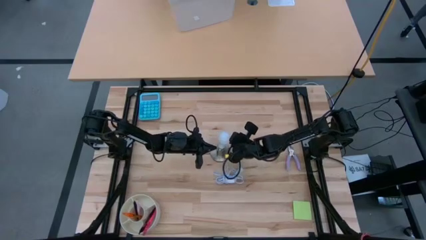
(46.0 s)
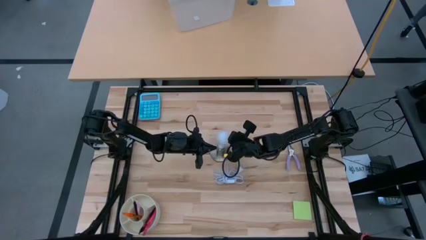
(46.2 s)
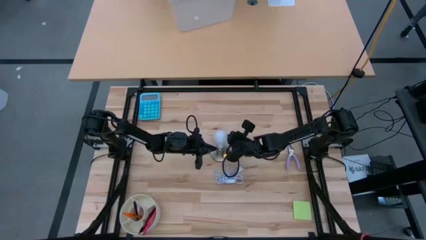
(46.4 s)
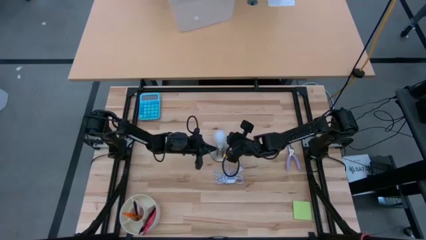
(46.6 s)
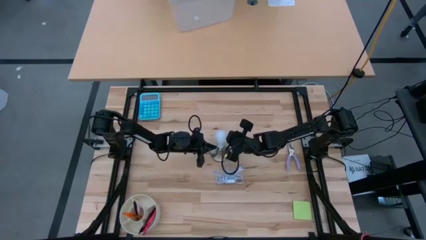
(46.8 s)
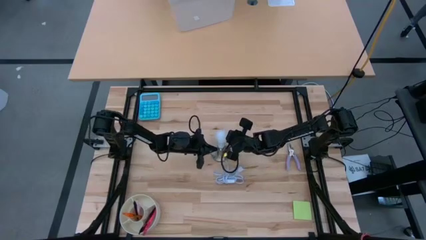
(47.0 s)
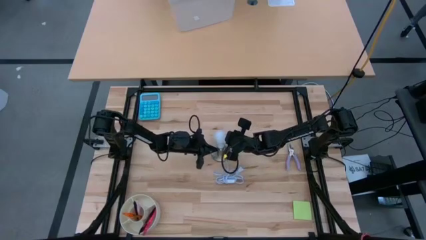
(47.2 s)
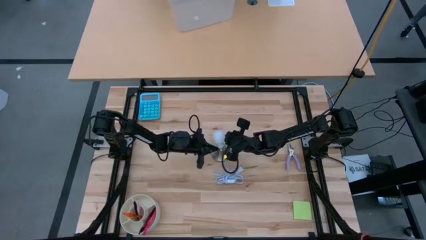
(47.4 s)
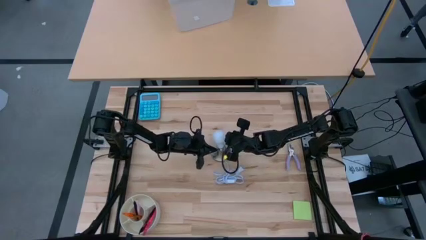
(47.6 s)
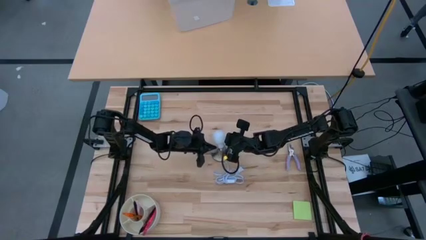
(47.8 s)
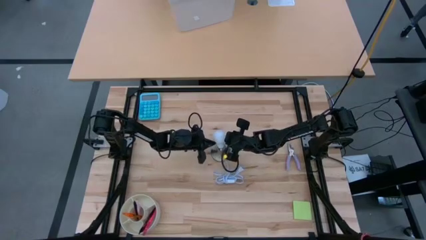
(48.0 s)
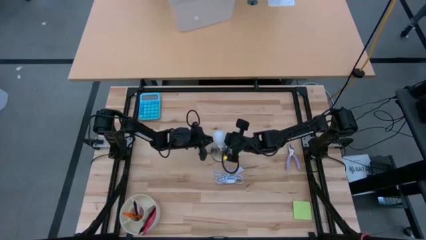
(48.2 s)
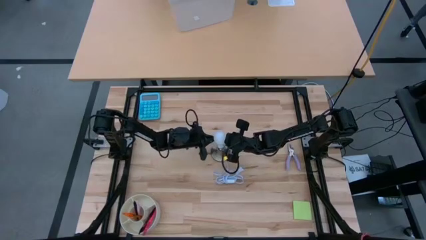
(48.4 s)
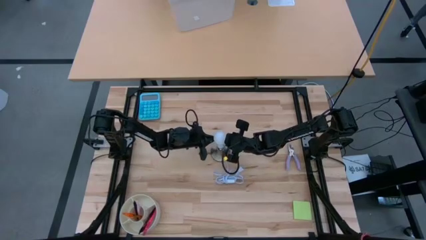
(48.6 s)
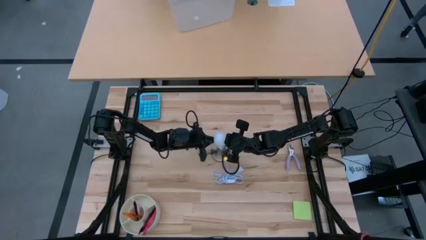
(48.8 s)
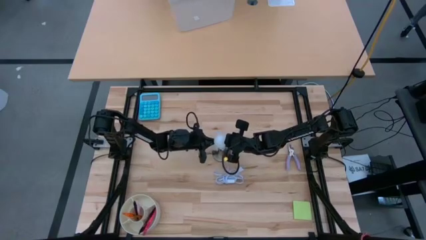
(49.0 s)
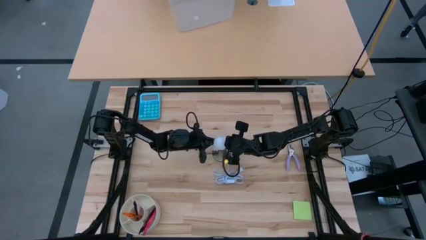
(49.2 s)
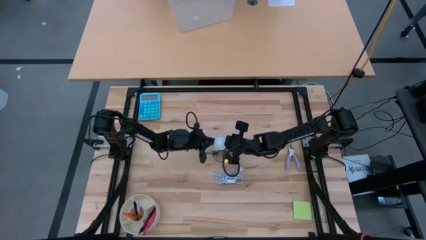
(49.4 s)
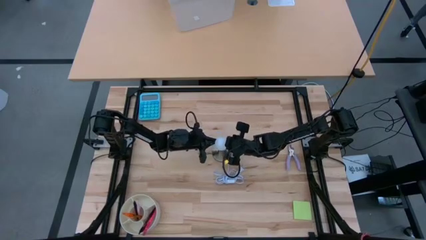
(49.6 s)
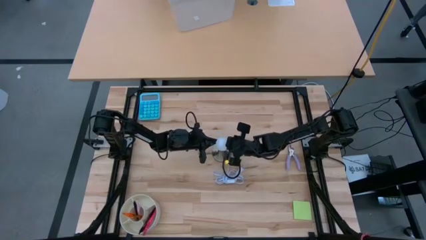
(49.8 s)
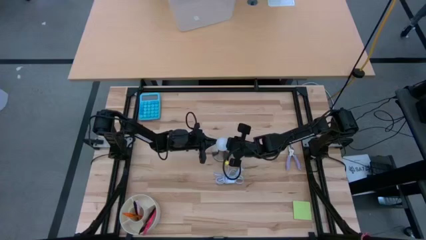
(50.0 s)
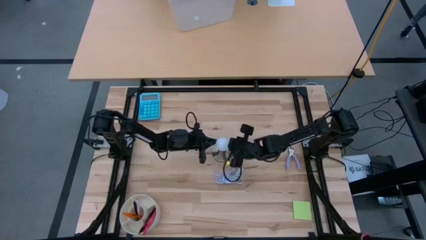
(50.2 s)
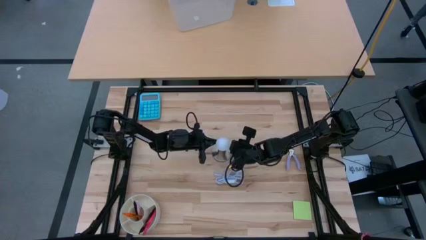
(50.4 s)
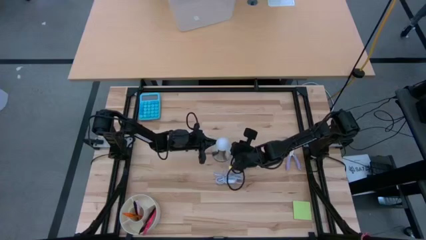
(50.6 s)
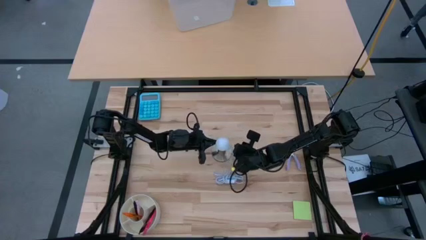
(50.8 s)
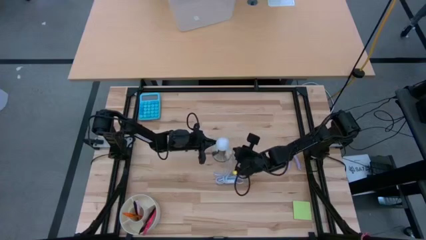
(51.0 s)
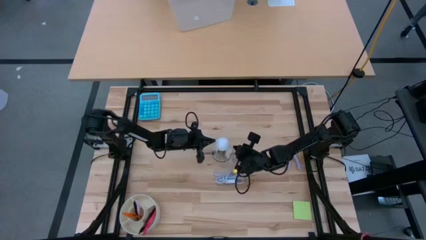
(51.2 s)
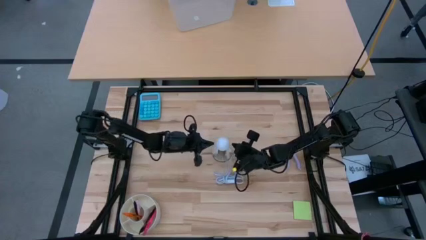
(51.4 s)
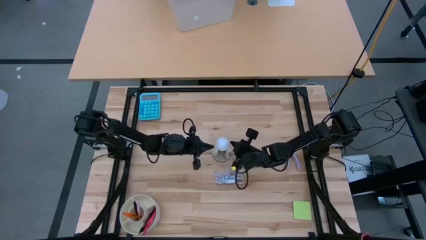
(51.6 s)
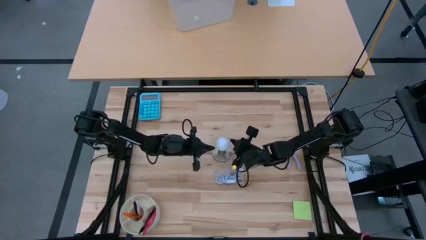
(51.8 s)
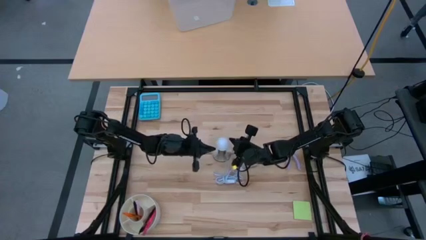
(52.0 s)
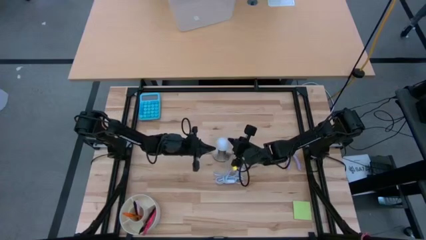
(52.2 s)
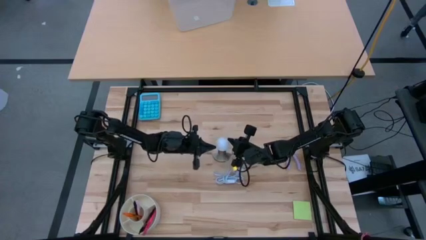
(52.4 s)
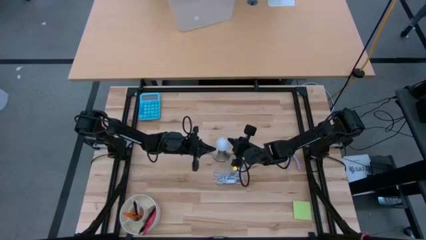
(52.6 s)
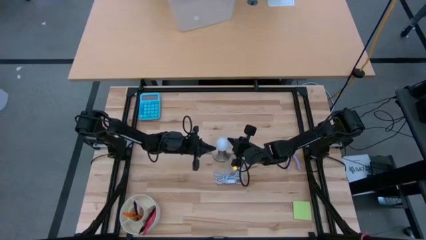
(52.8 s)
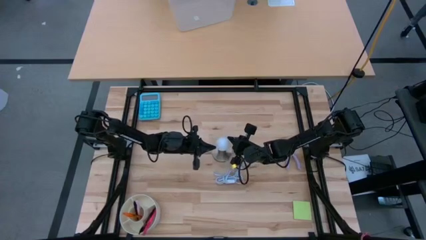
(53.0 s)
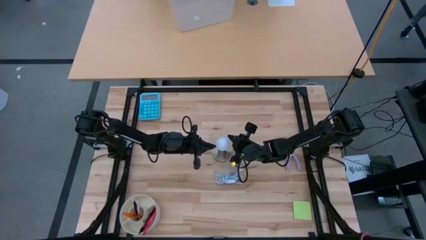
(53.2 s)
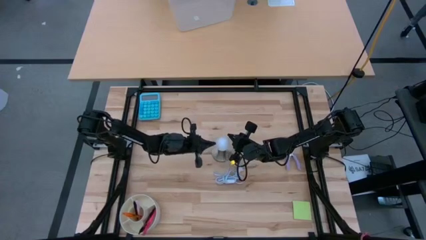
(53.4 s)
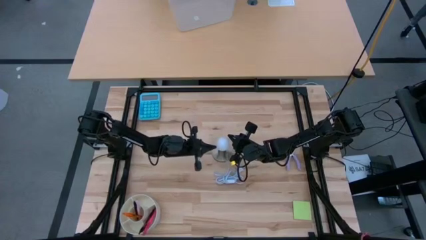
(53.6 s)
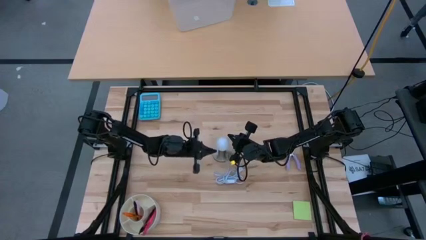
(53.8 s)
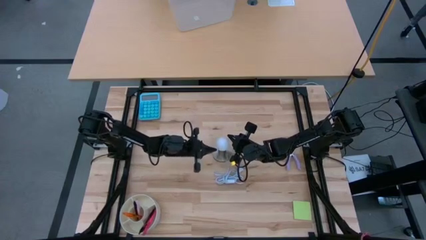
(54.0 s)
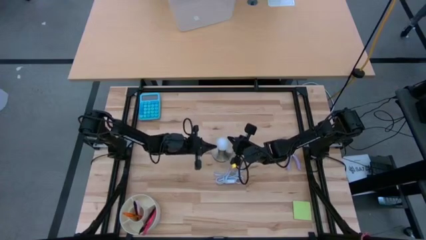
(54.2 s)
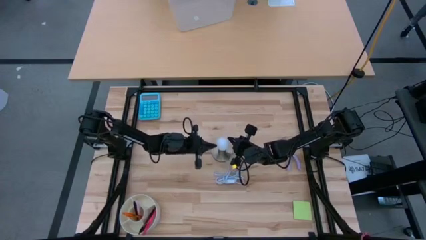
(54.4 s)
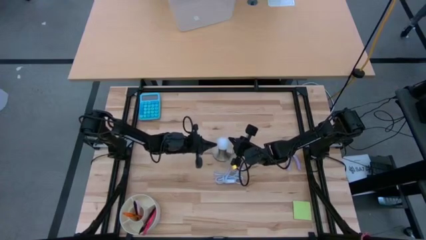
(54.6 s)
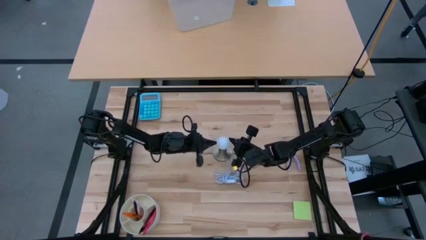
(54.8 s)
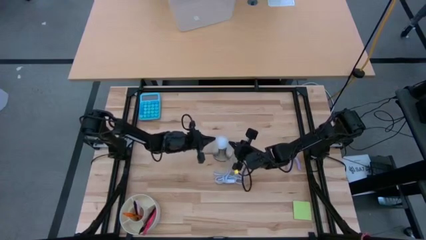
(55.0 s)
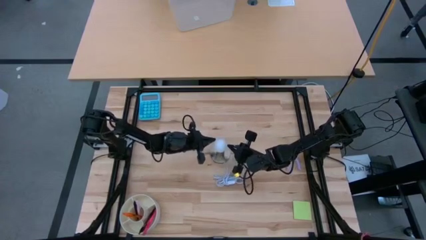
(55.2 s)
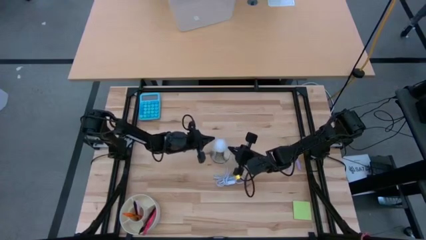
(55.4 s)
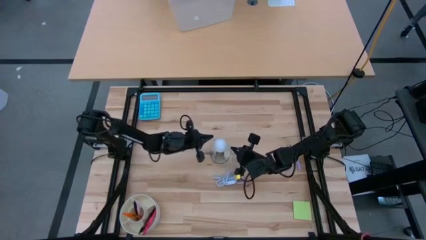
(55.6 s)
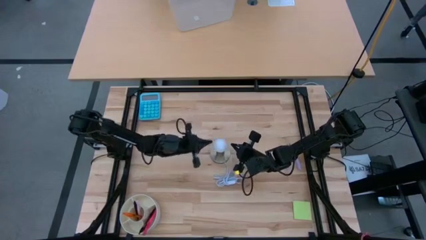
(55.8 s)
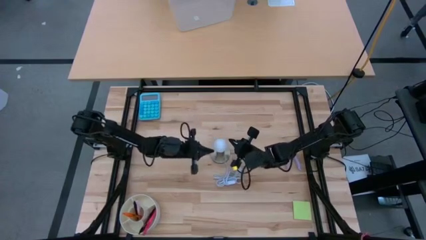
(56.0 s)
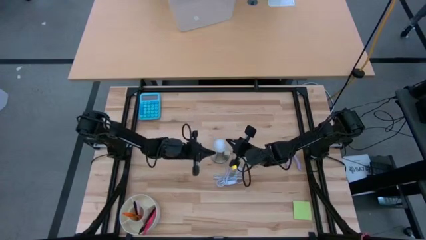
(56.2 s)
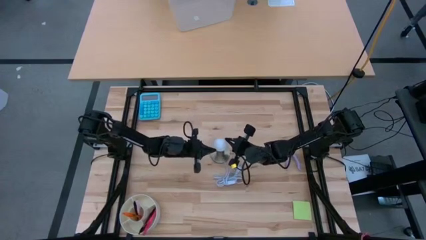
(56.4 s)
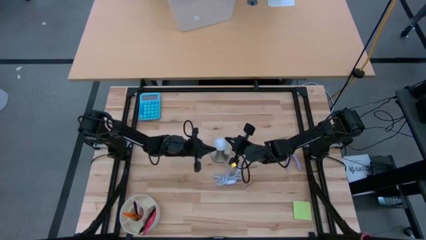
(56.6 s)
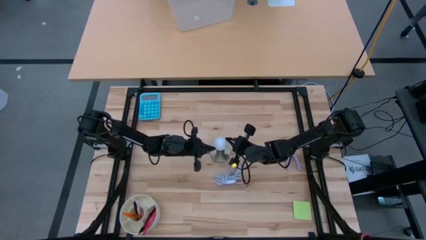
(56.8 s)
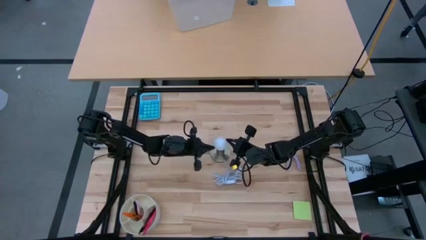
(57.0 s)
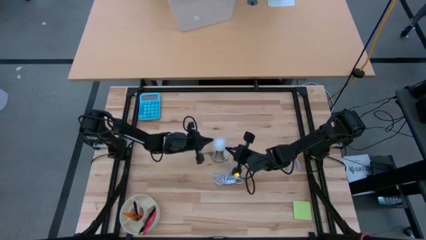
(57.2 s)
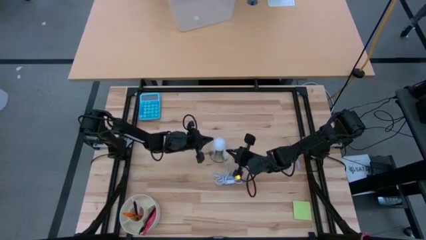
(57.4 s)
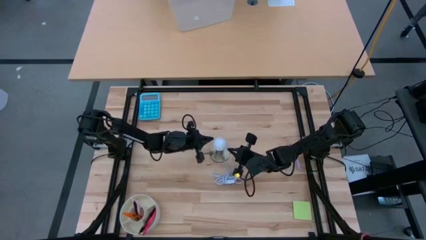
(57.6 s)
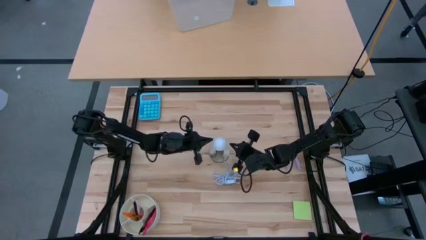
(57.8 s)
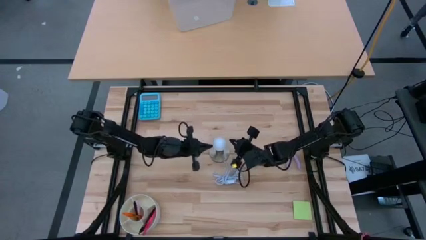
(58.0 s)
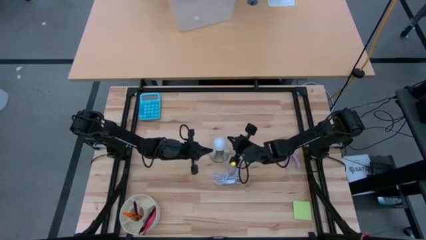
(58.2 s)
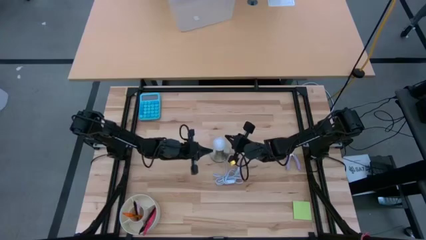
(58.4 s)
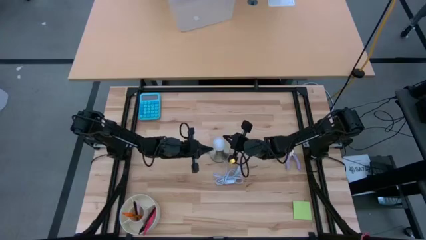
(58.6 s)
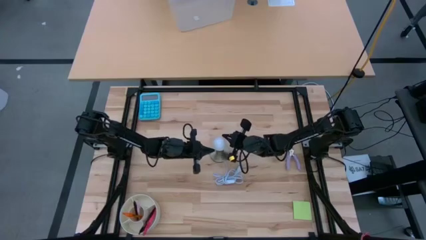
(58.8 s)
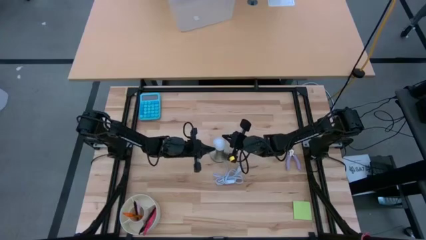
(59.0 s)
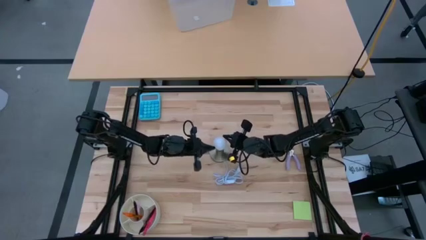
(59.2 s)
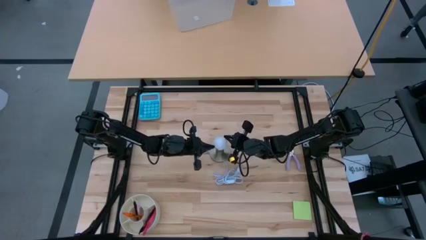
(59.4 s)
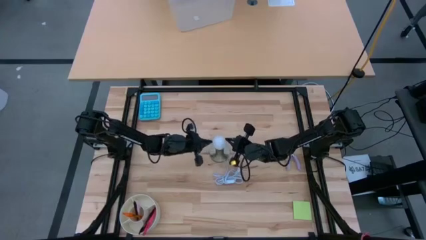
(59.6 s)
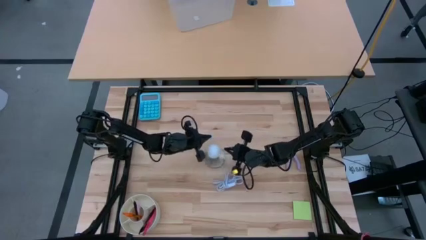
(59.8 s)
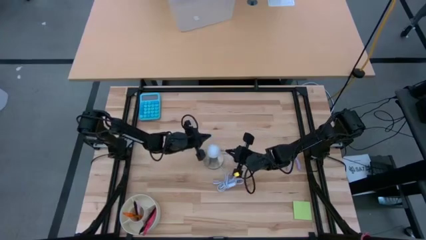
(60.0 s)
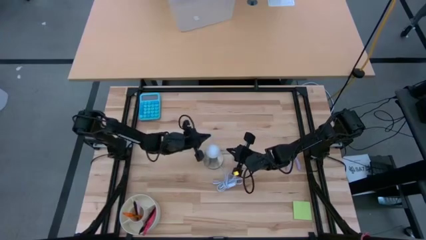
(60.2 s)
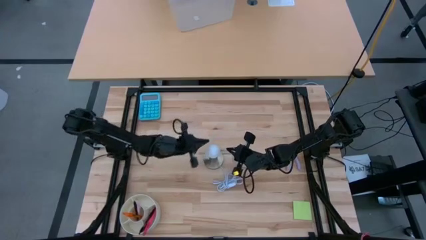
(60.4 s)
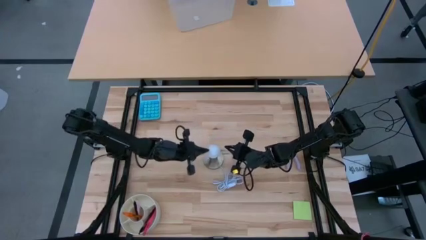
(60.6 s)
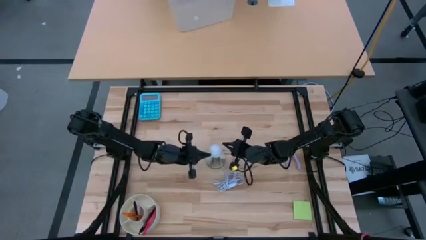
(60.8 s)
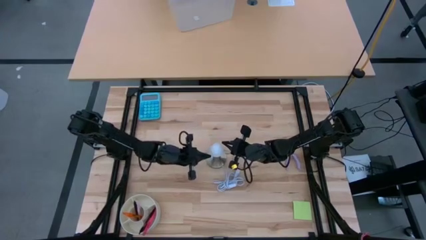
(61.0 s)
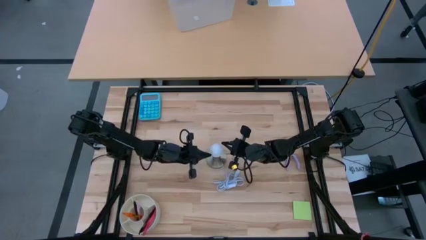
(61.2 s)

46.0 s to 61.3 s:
Task: Screw lightbulb
Insert the light bulb into the lamp
